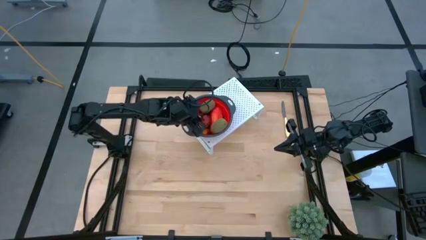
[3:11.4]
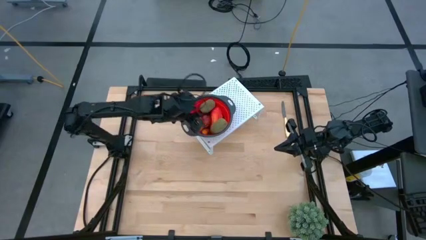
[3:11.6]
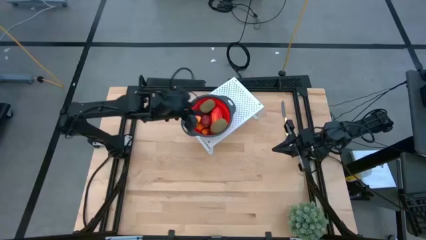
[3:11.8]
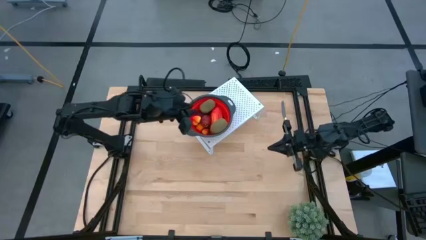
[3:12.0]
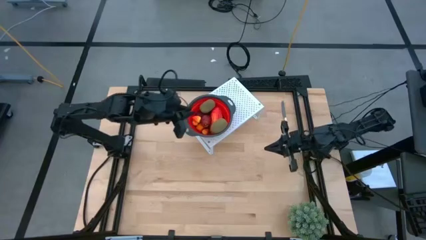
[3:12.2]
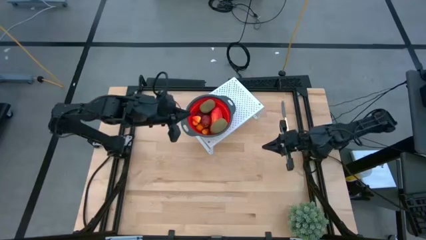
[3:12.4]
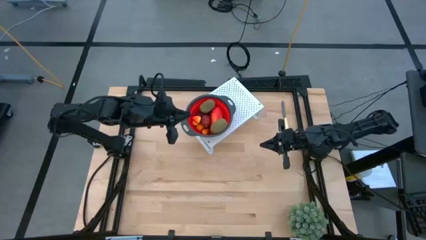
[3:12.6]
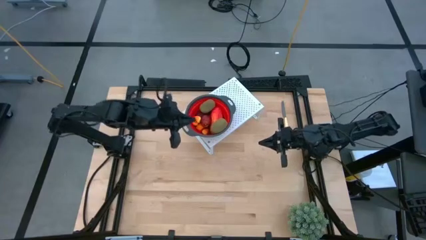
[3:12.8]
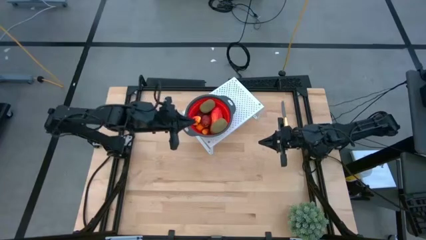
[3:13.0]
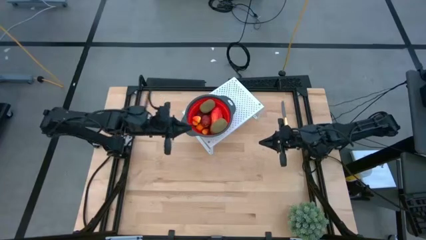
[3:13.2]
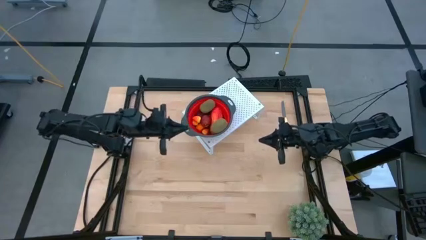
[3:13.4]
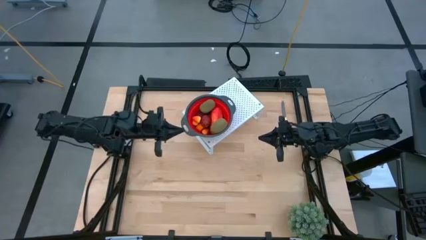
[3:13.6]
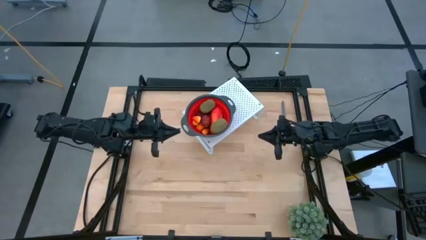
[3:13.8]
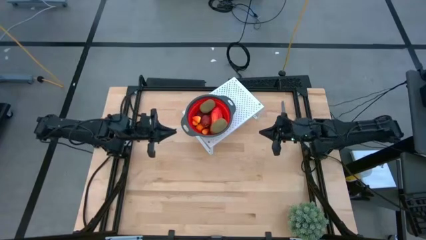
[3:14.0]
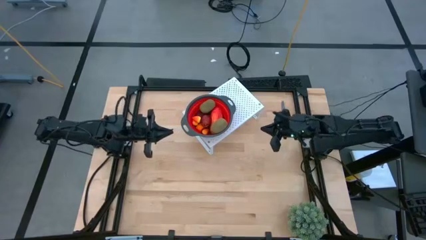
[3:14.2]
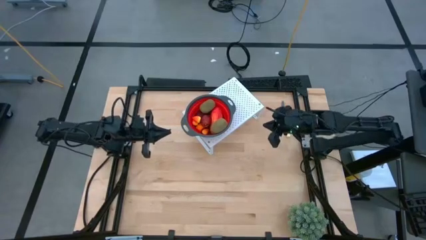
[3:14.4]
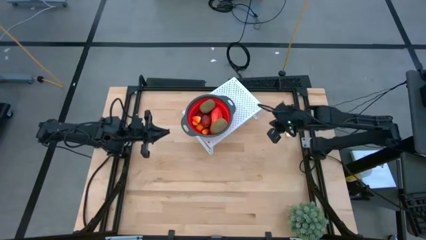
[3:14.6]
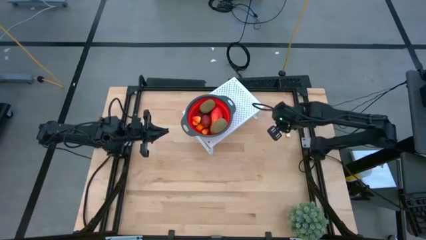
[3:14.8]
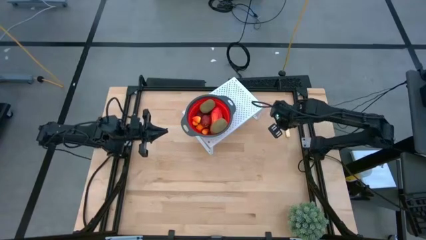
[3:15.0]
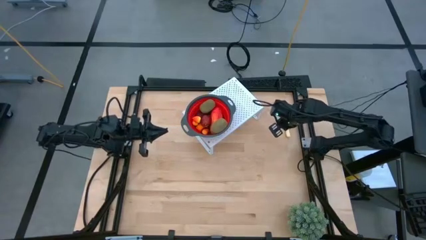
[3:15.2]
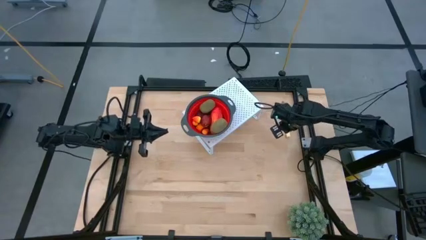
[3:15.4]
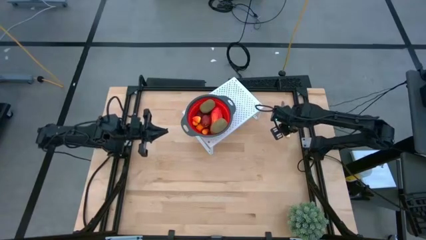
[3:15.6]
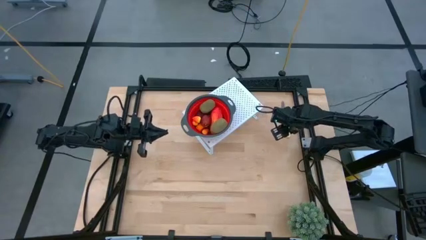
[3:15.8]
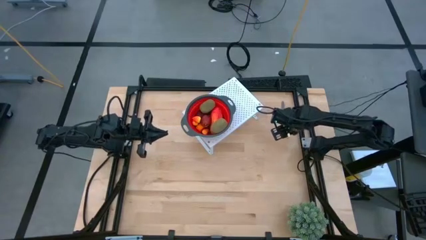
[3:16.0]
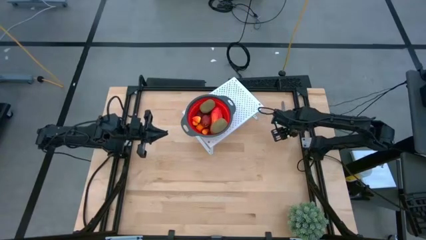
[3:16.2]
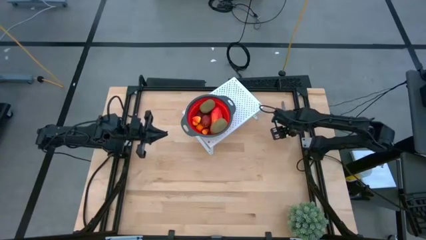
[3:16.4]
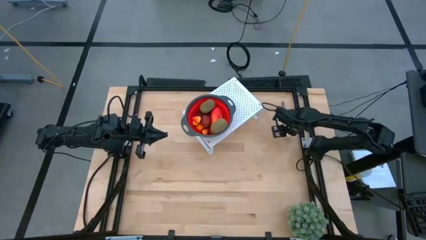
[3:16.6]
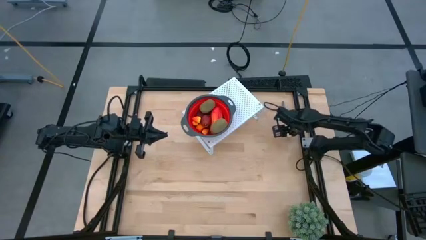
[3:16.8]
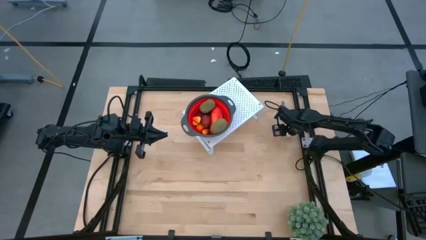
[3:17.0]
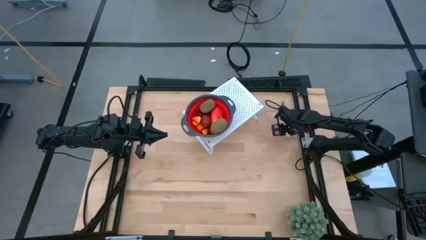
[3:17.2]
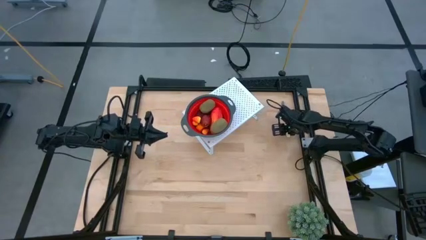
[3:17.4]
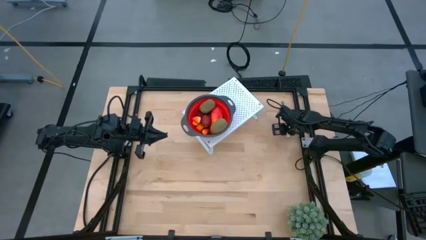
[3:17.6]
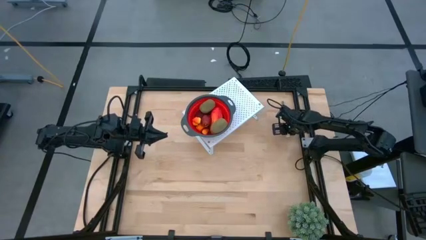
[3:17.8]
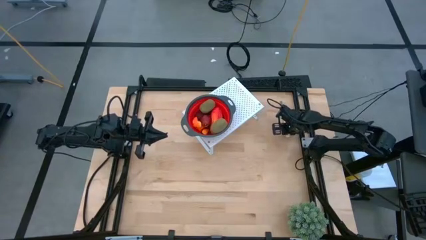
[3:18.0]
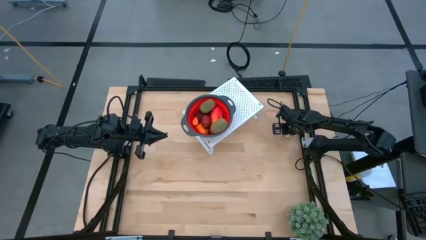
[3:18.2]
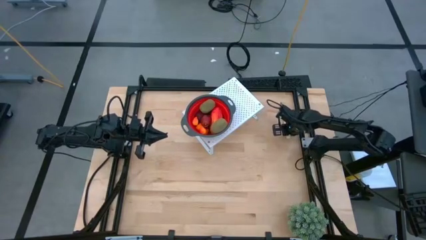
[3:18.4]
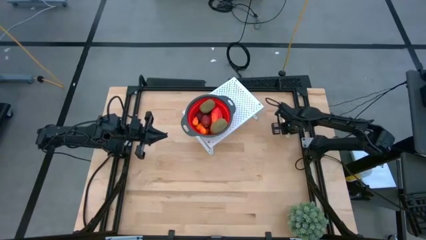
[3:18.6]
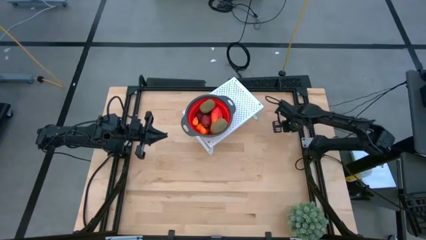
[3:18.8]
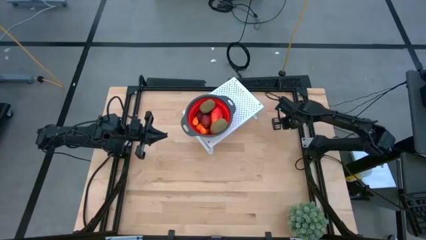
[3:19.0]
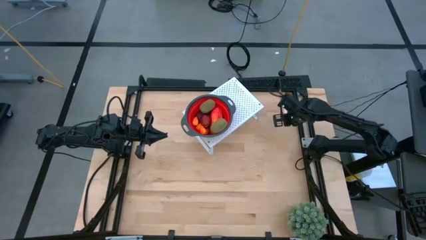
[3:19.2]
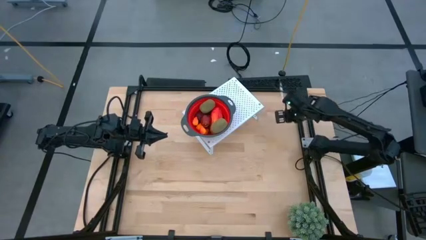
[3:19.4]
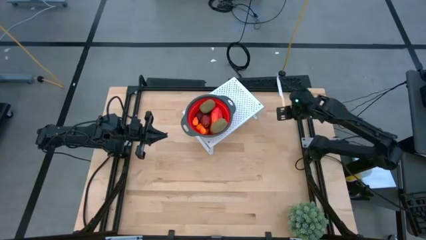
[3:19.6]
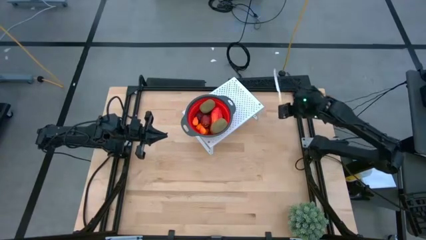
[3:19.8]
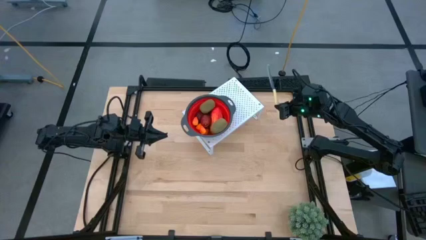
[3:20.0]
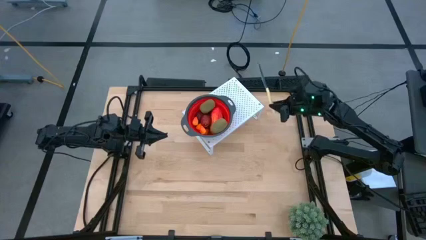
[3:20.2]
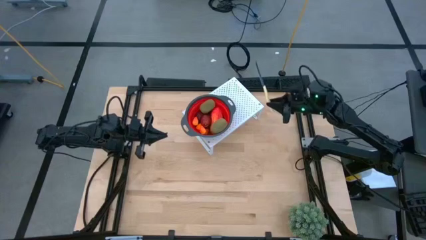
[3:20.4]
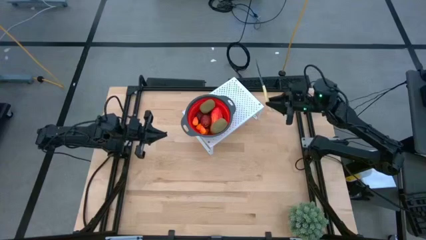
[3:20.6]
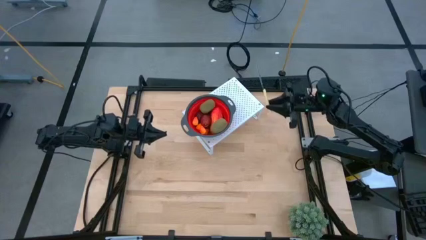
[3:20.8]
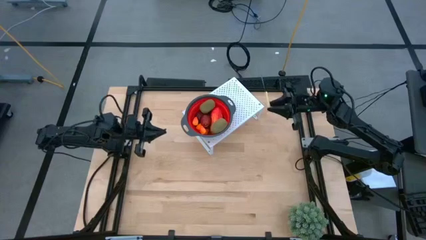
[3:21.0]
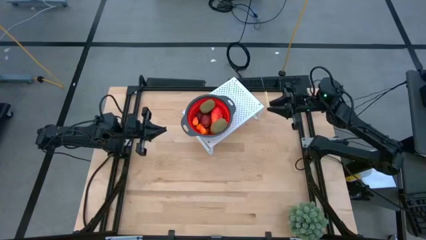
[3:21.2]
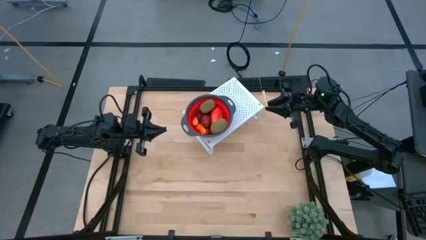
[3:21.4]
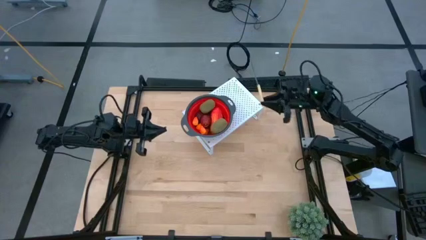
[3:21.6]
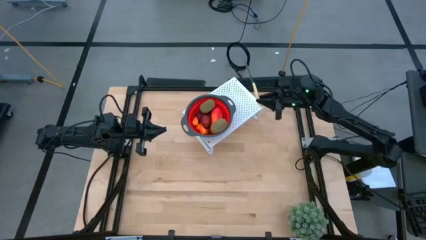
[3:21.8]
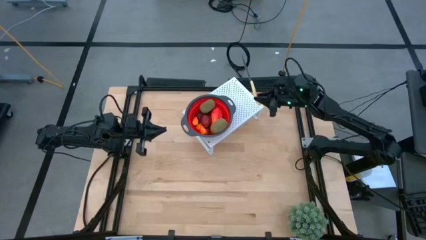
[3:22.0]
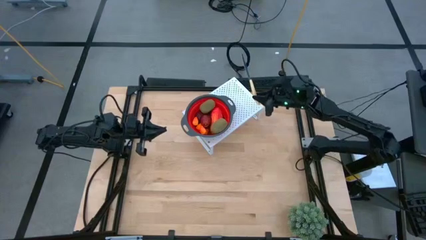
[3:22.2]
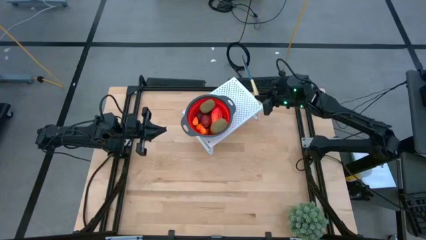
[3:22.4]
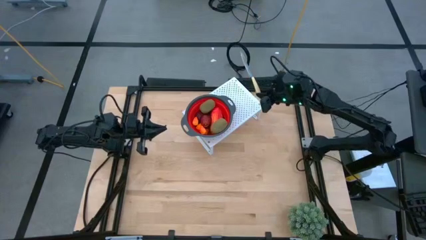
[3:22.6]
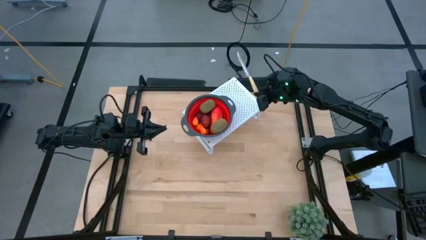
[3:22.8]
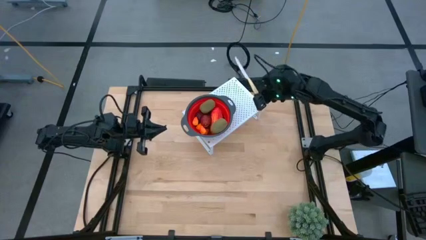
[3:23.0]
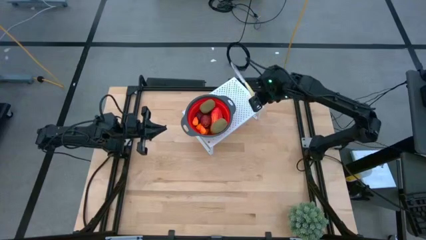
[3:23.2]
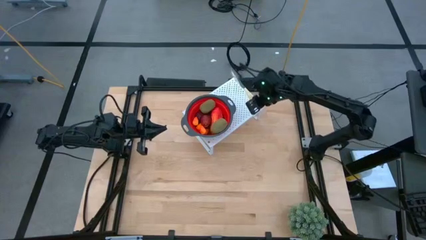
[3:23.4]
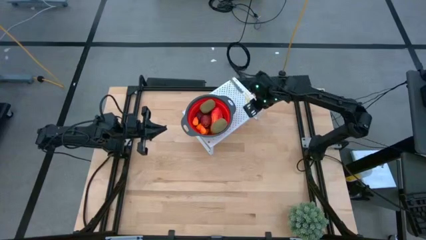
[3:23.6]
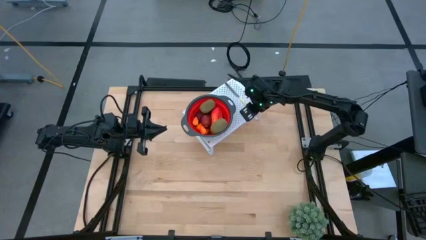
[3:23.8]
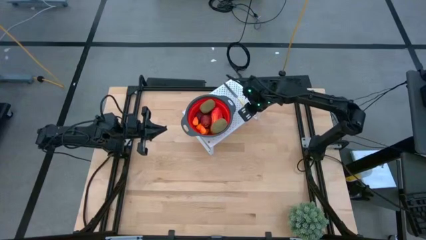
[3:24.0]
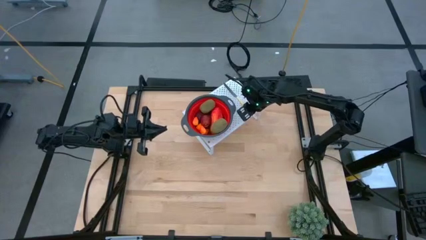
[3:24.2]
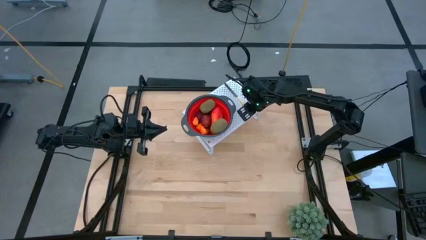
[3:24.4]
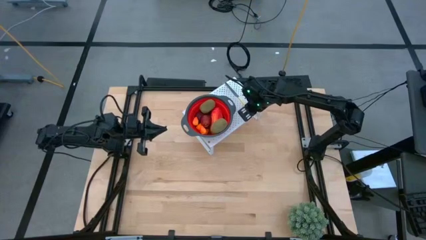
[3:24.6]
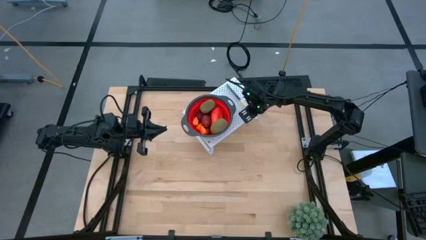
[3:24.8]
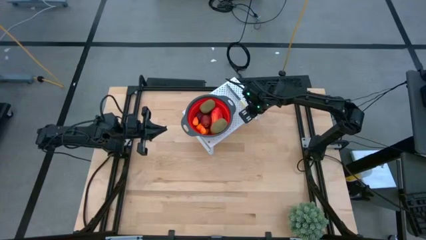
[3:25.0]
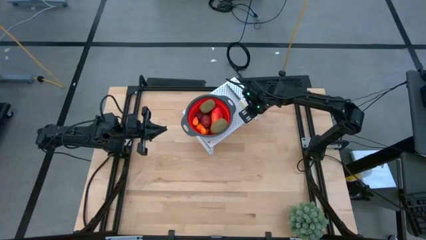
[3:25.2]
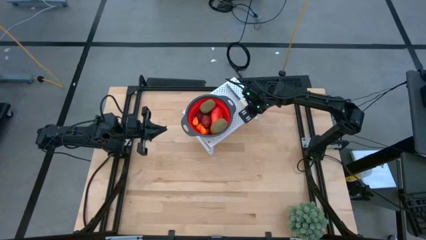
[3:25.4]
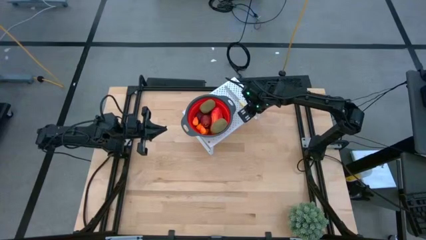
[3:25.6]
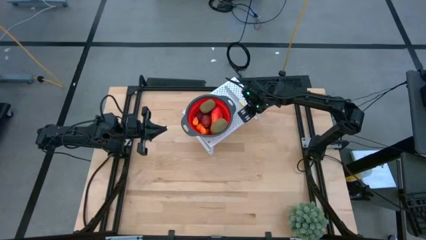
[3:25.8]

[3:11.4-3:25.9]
Task: Pick & Place Fruit
Put the yellow table knife on the shelf
